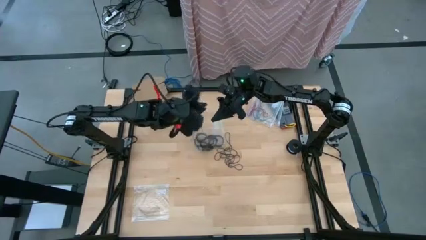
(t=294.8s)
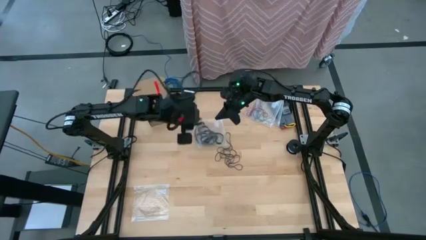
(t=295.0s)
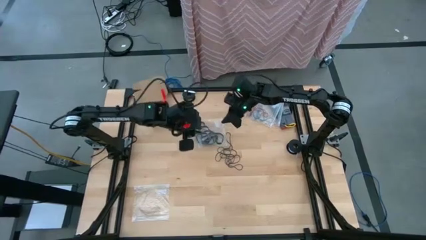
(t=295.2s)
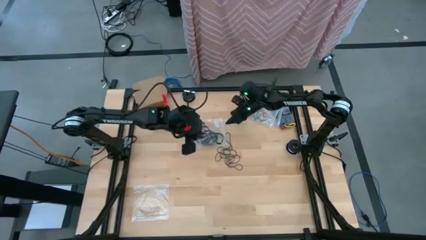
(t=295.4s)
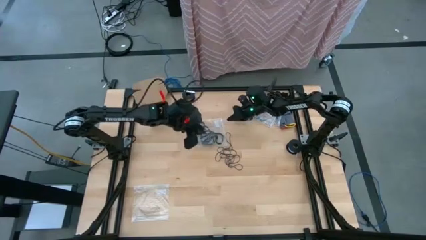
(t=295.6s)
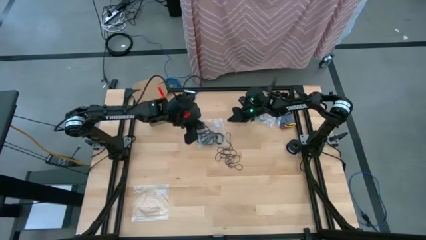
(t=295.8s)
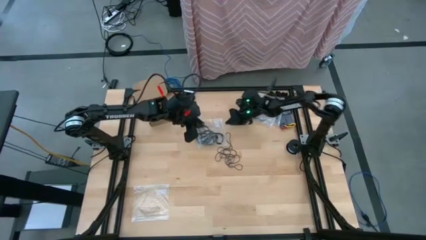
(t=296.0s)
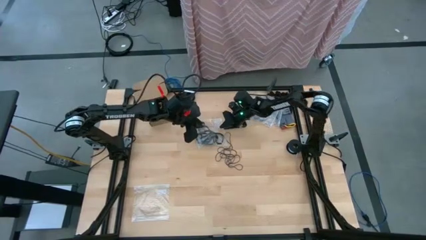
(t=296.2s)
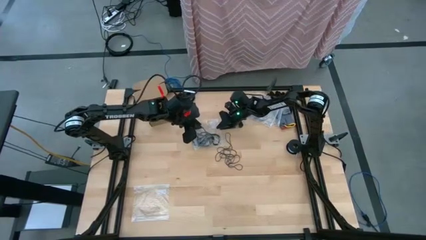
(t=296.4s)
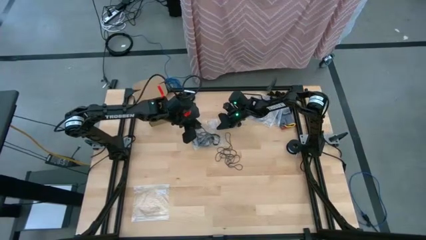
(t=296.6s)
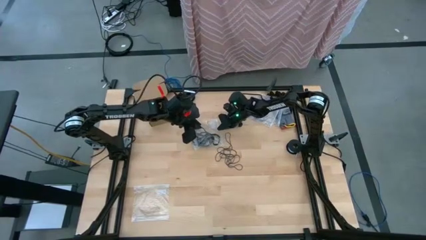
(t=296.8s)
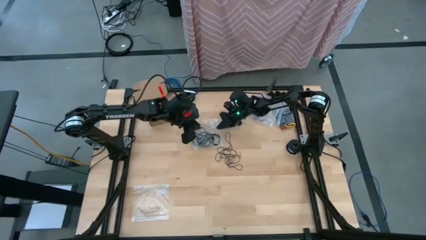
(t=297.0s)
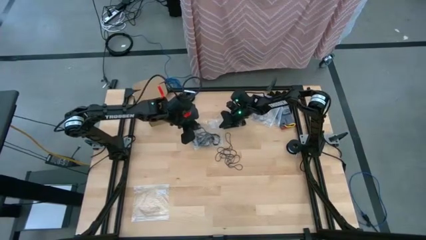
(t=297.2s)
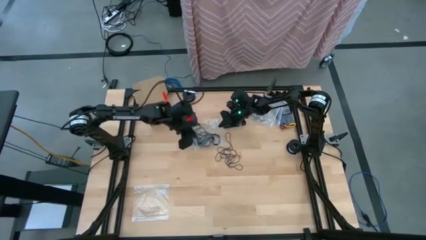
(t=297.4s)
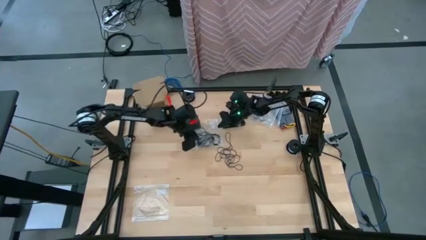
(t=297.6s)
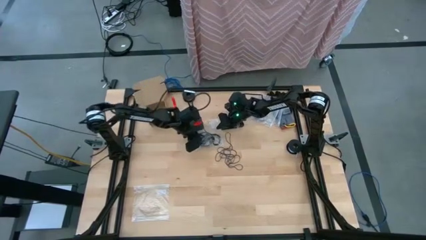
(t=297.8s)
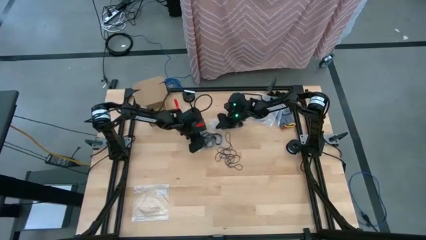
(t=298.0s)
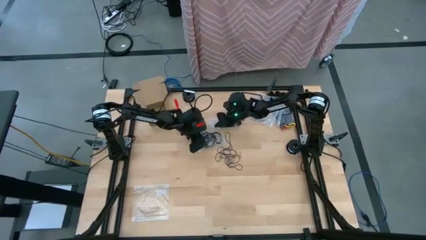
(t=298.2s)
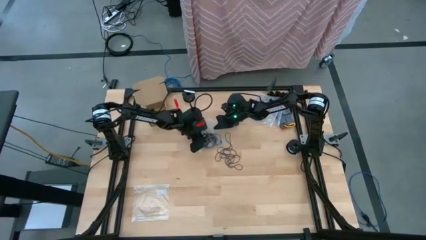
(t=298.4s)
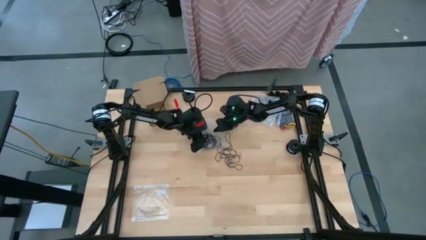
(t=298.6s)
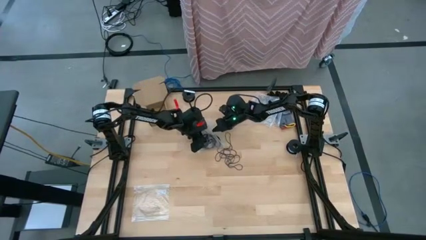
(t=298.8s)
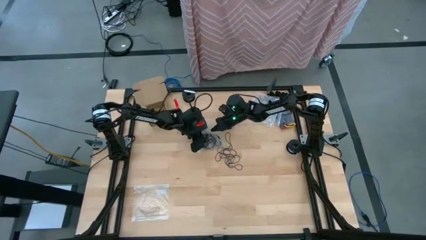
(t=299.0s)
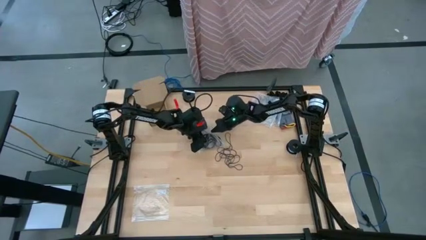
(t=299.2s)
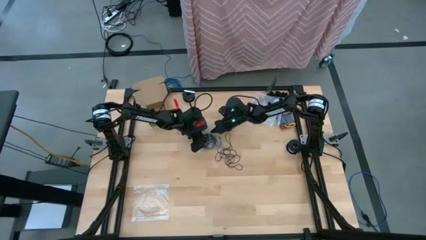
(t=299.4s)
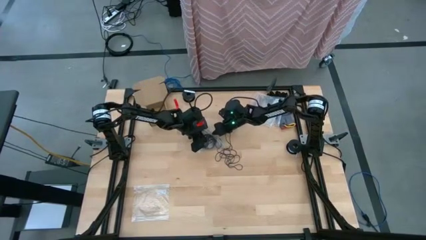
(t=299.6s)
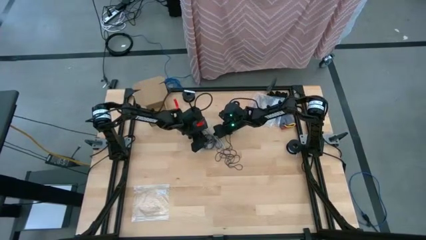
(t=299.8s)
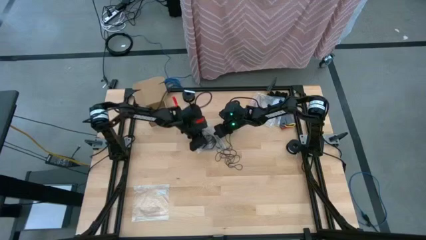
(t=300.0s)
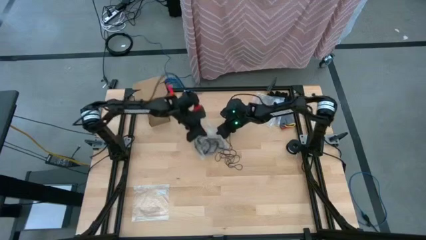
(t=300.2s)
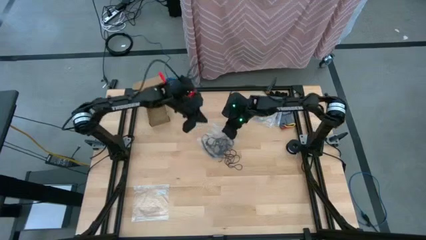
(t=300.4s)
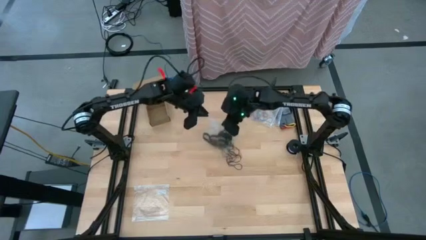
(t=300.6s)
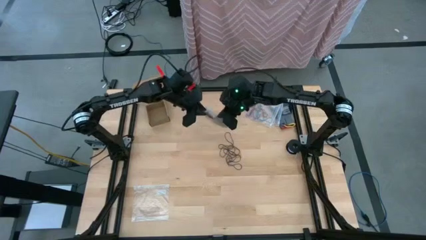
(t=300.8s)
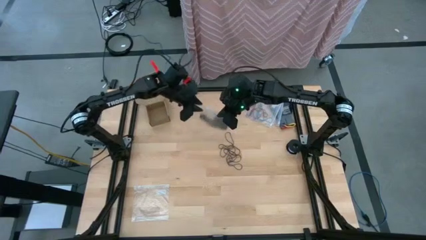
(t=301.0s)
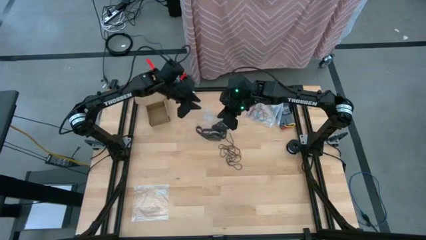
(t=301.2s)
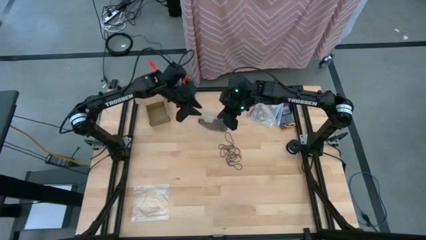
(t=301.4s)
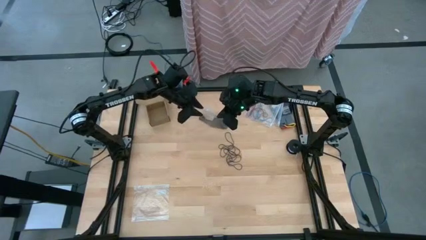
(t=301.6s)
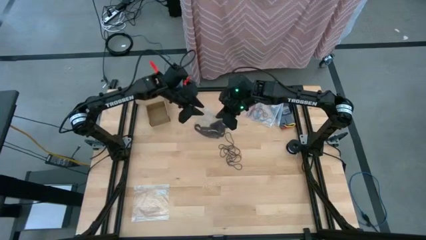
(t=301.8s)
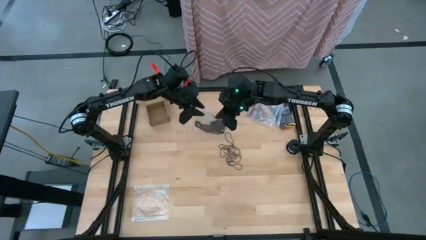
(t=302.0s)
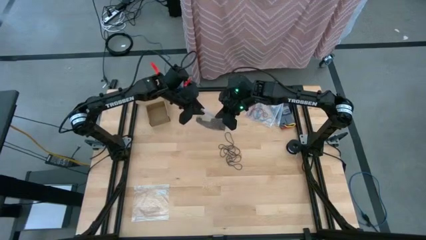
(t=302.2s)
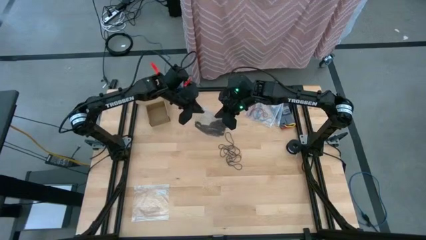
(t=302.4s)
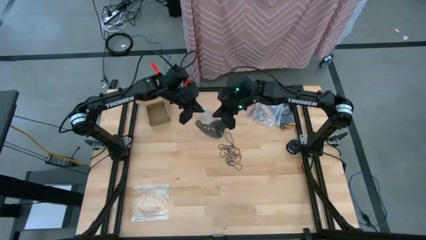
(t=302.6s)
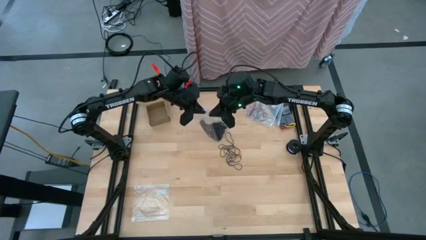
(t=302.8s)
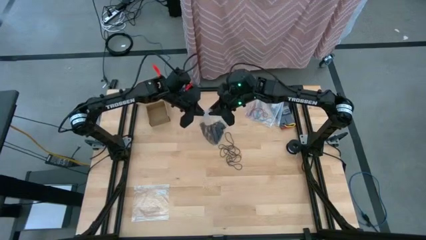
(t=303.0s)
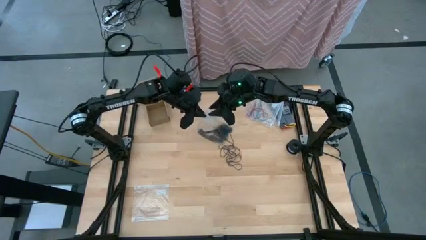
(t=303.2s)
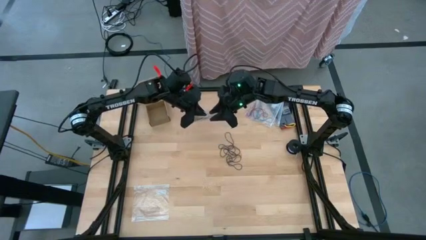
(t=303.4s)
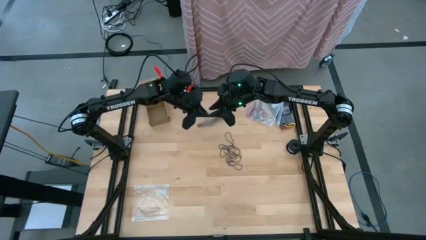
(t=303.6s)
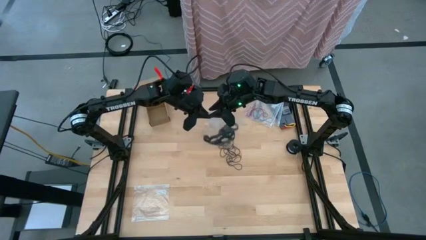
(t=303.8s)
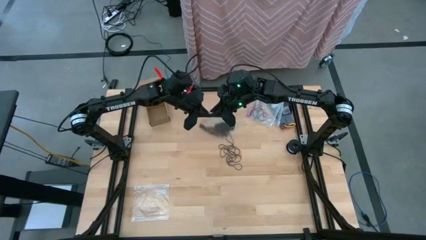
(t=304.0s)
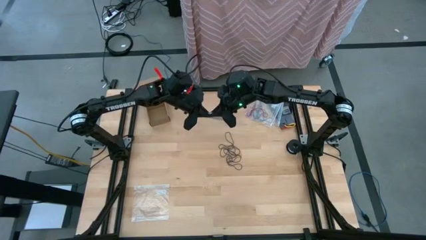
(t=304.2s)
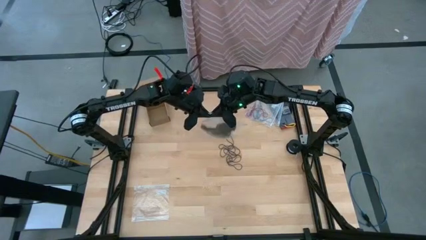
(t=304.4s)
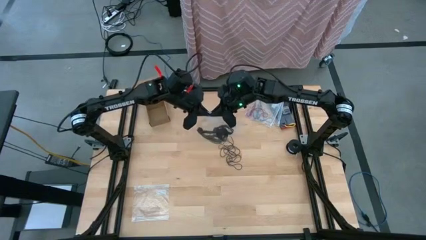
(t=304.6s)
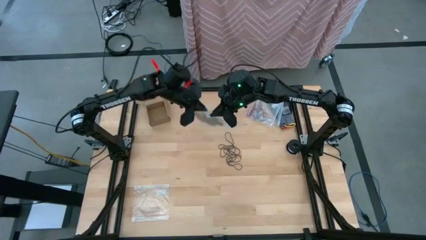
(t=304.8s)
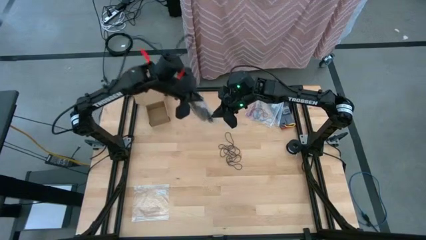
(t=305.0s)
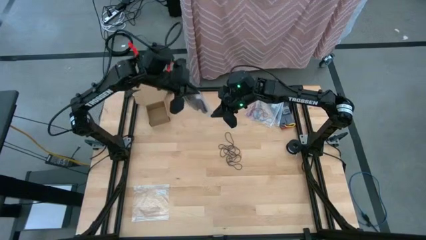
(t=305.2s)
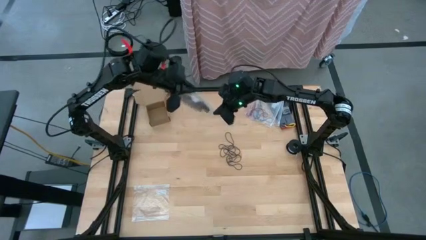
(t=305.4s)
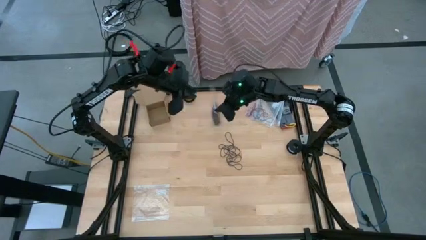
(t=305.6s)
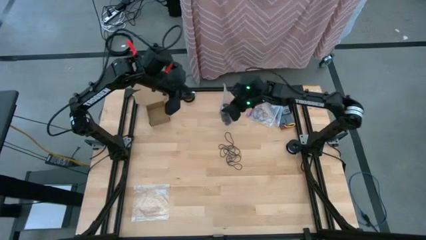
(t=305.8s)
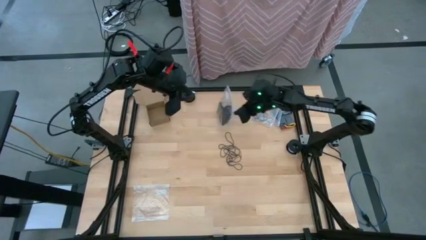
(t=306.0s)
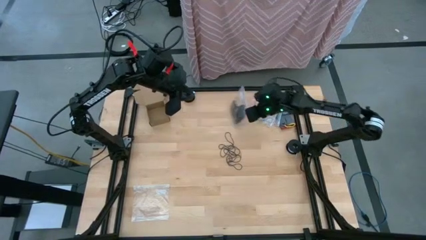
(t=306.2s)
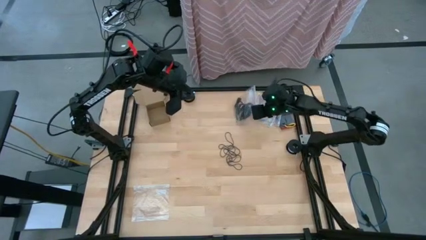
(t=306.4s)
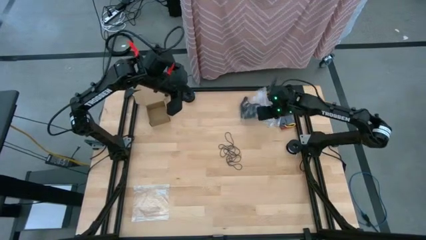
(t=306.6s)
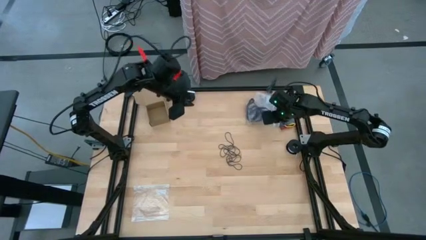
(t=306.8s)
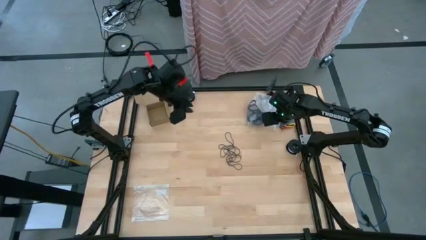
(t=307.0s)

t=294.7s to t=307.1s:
Task: Sort rubber bands
Close the transparent zip bag

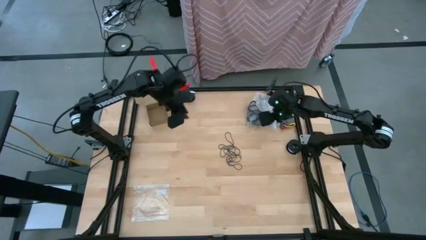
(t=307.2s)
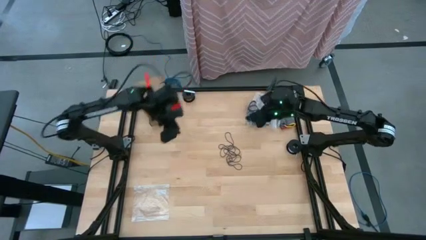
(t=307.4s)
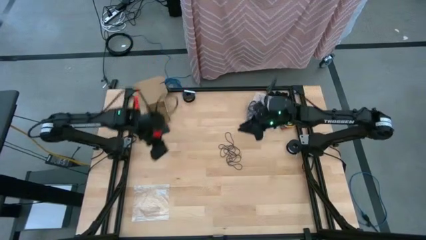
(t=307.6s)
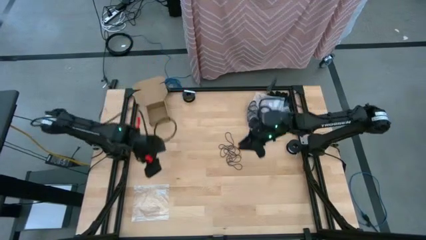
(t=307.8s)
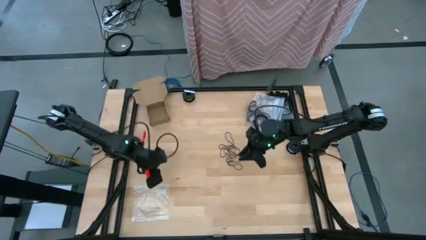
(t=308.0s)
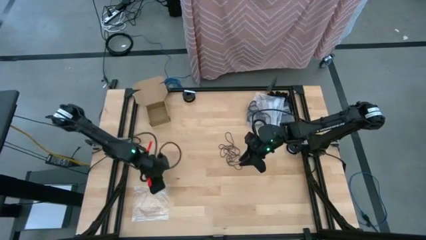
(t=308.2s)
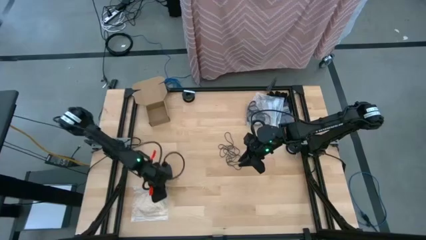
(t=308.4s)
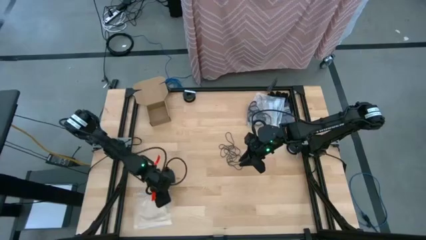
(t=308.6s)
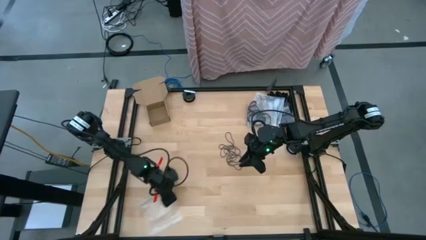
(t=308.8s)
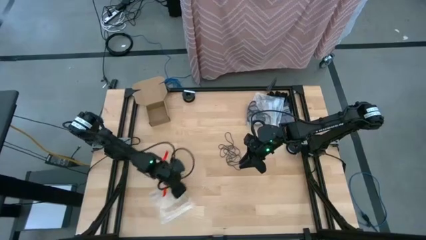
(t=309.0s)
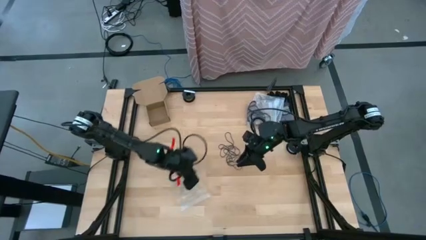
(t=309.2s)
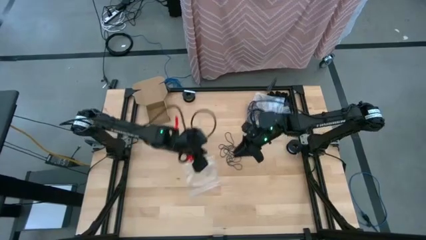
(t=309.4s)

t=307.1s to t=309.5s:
Open the transparent zip bag
